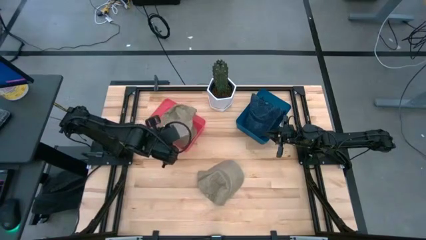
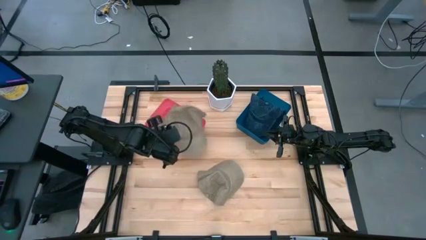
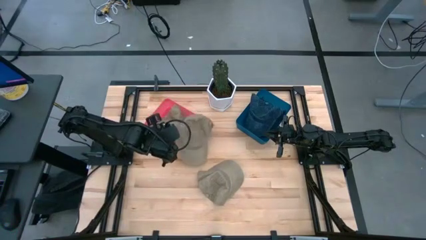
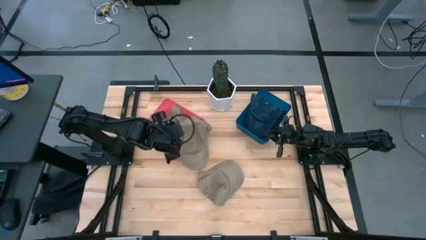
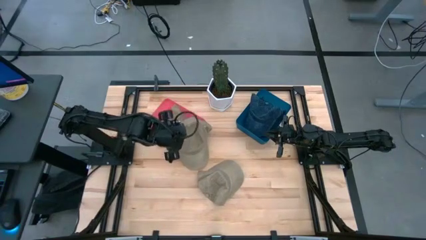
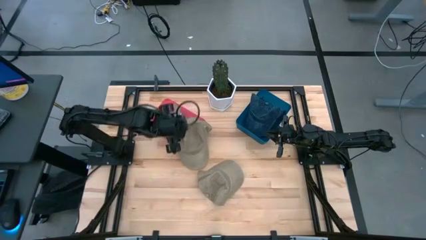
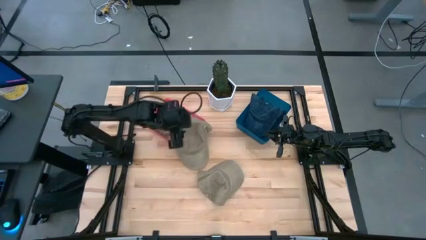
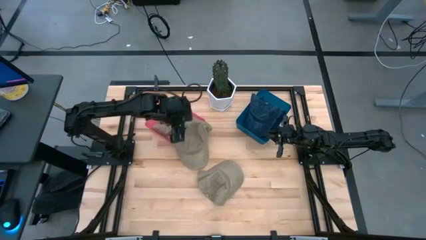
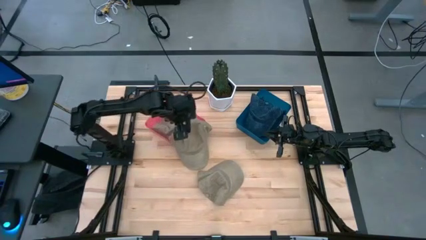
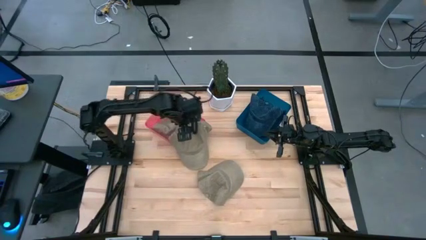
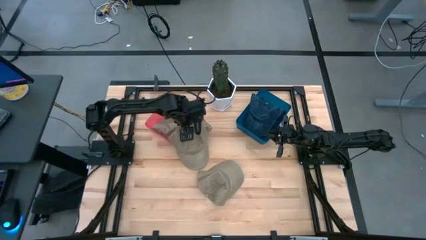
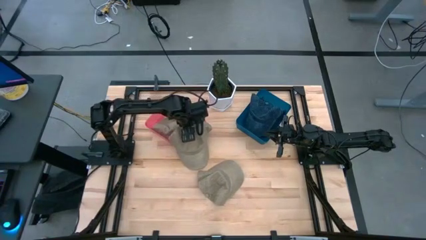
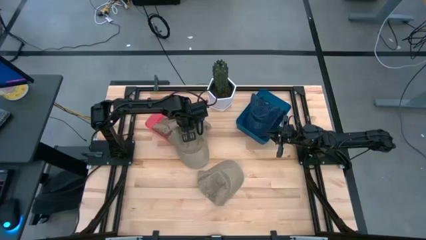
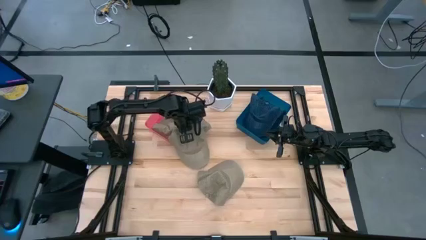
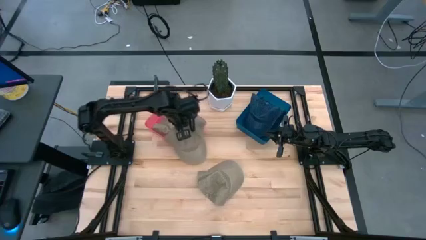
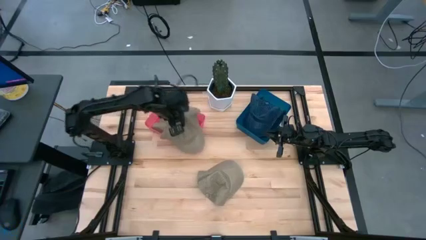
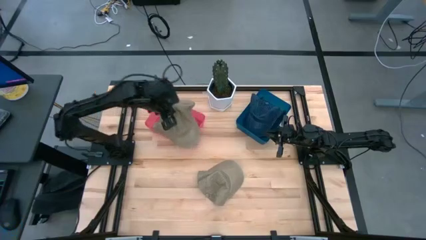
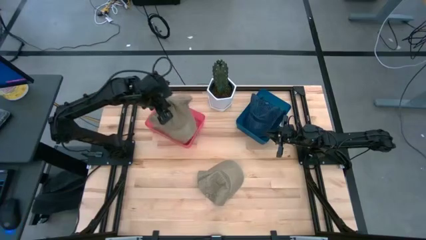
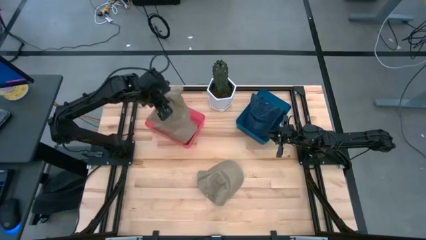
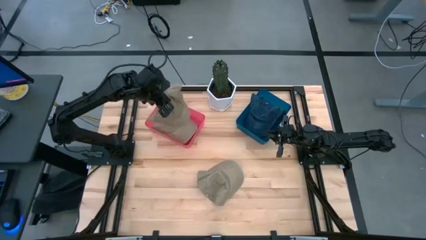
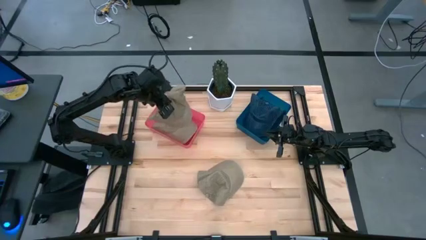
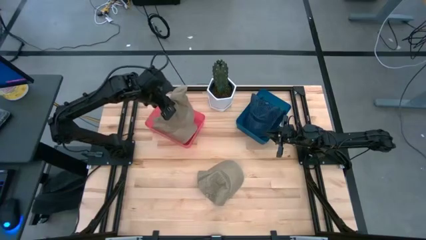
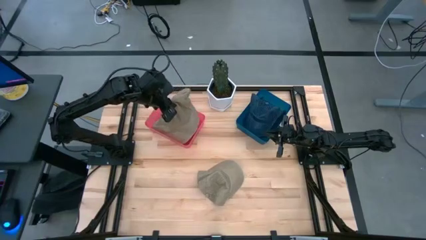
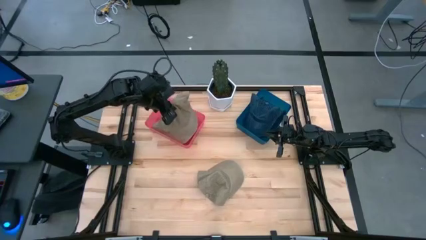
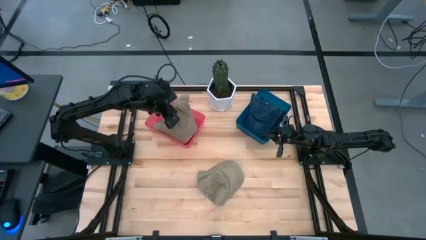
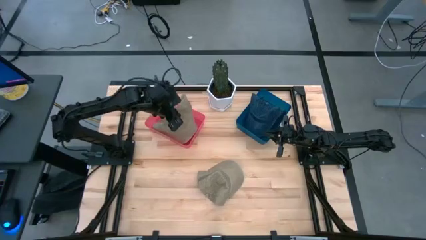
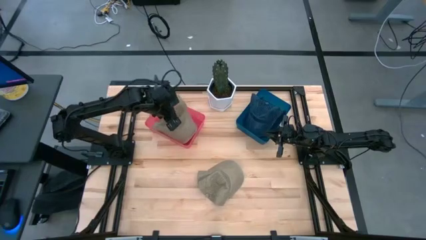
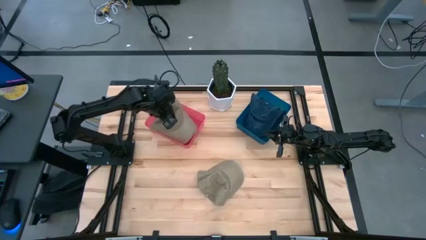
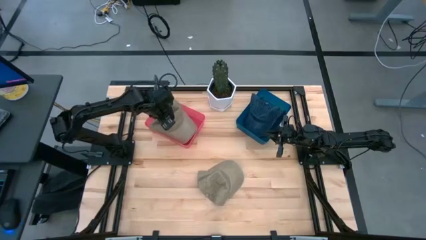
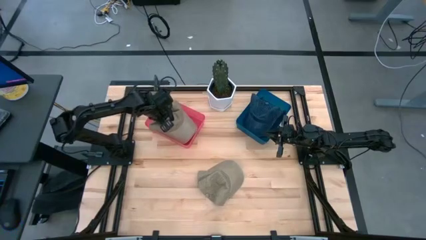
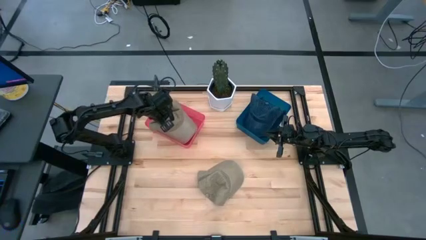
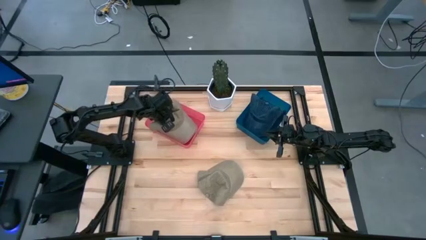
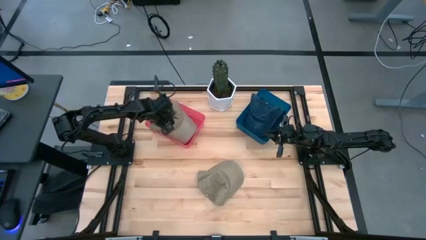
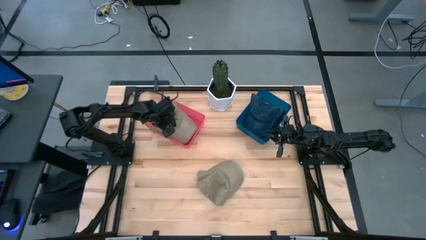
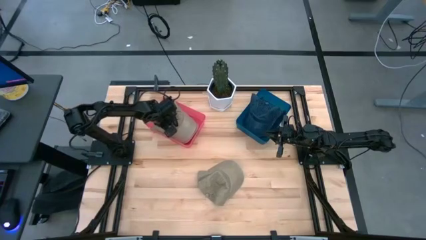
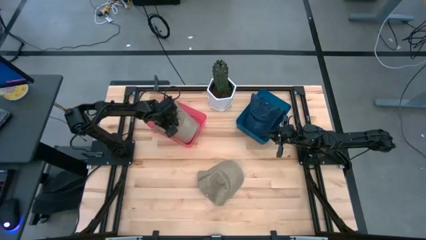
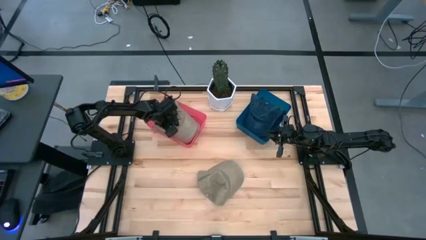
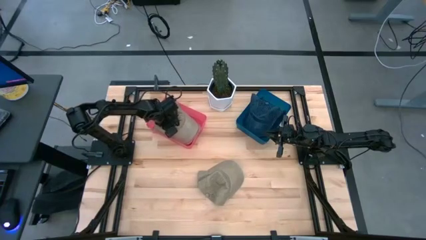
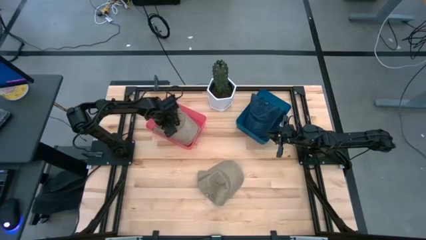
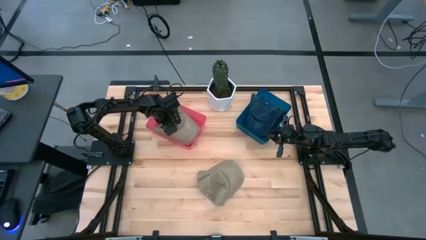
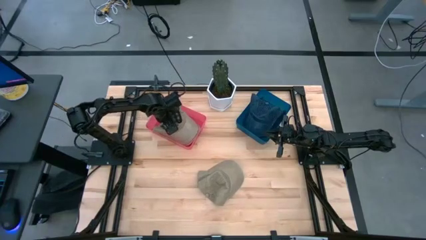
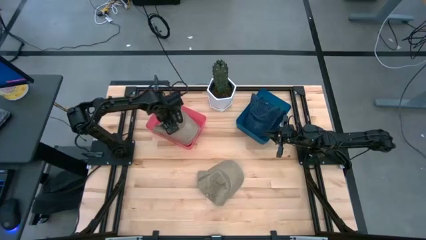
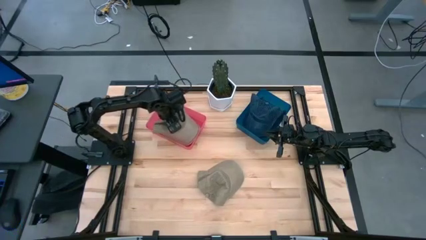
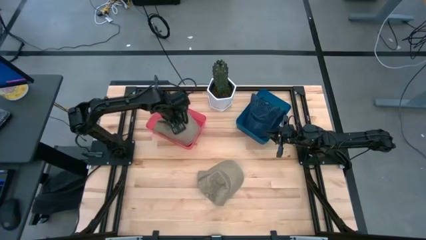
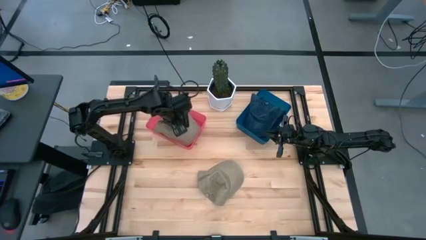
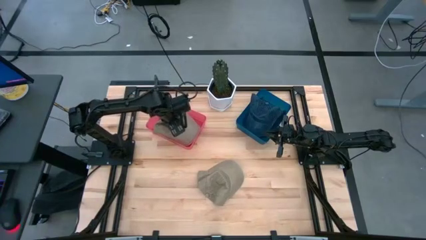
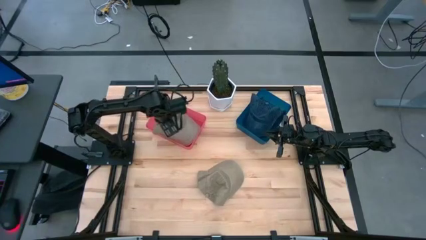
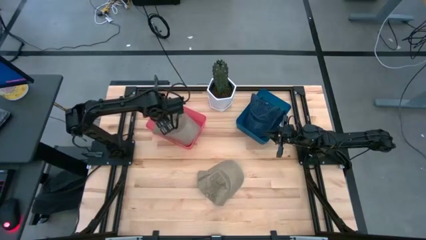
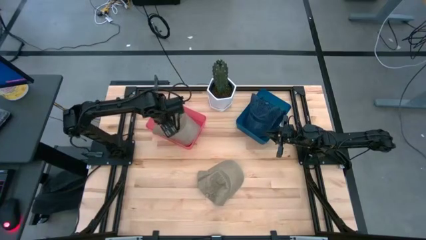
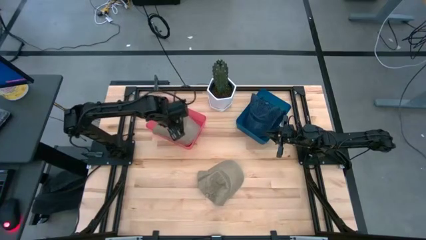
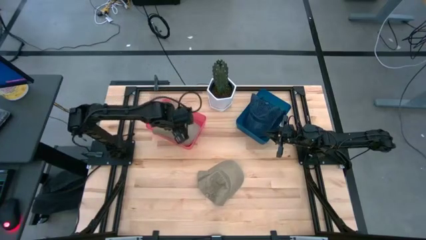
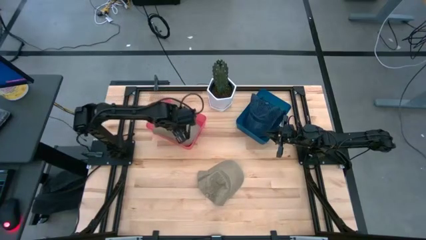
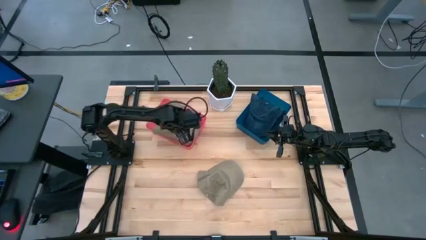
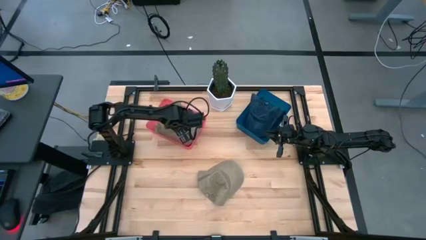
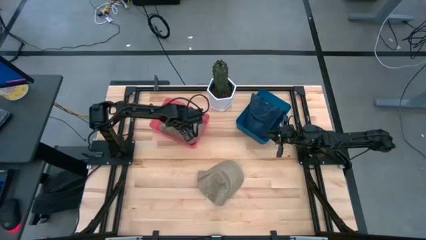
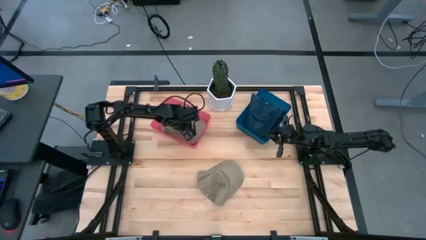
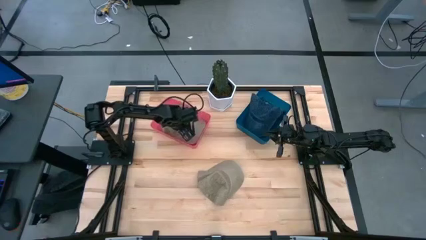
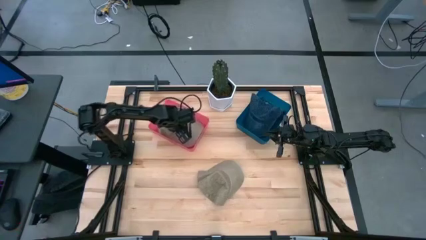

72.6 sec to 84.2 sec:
Task: Pick & Place hat
Put the left brown cap into the red bin
